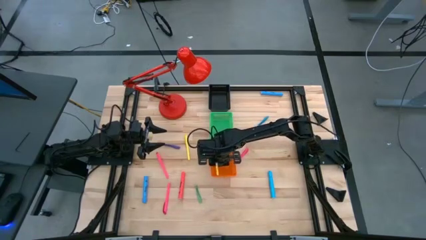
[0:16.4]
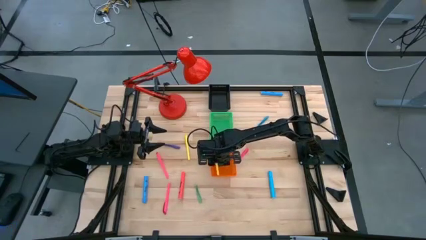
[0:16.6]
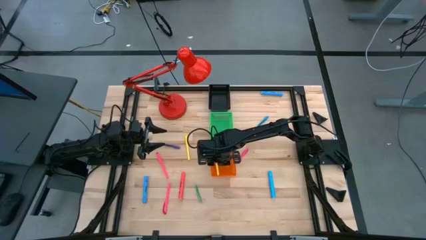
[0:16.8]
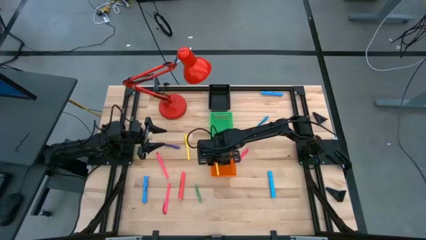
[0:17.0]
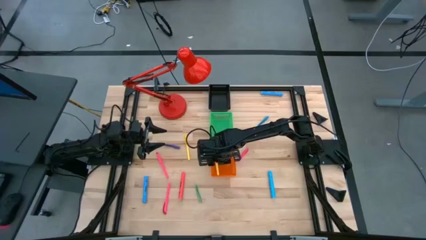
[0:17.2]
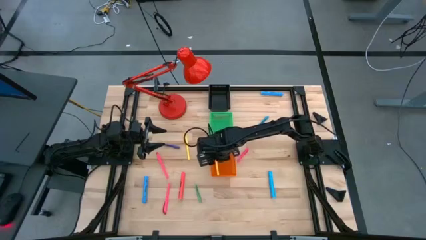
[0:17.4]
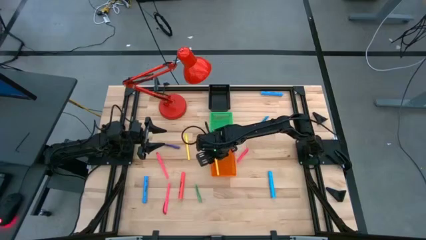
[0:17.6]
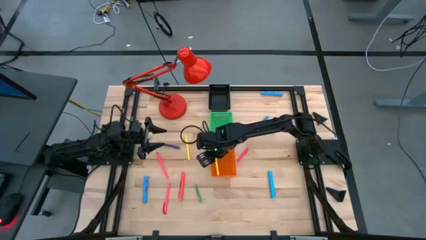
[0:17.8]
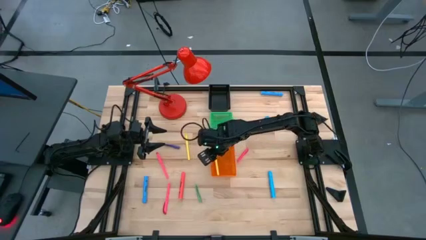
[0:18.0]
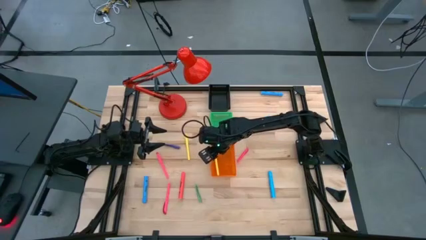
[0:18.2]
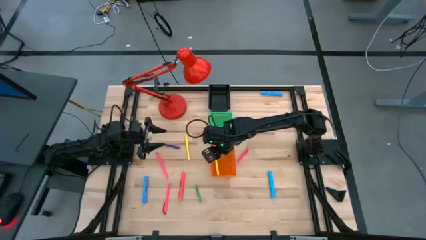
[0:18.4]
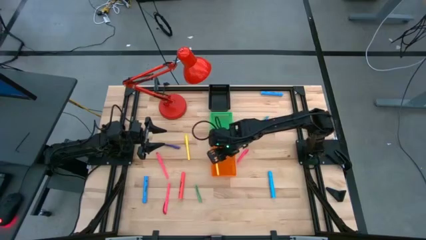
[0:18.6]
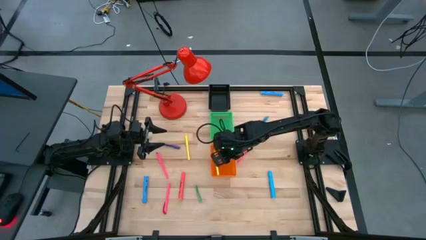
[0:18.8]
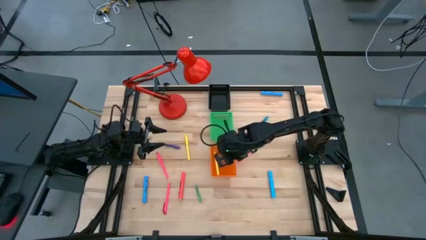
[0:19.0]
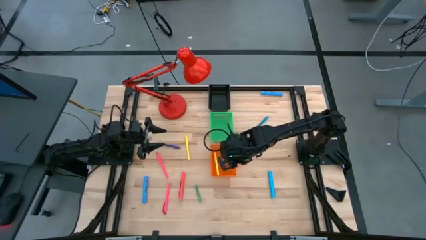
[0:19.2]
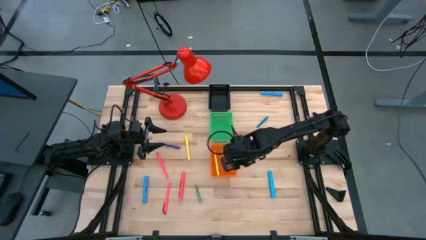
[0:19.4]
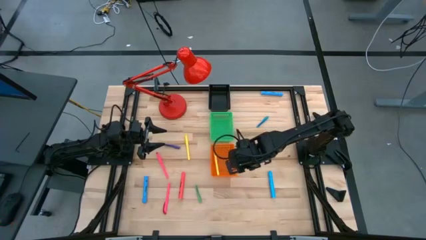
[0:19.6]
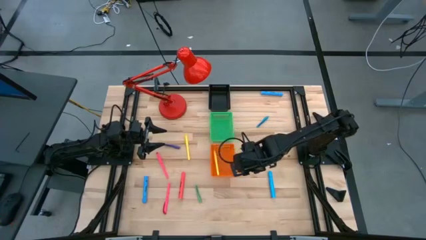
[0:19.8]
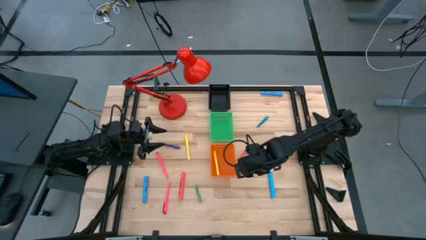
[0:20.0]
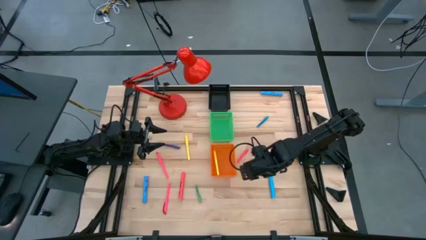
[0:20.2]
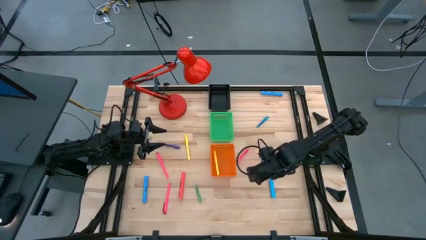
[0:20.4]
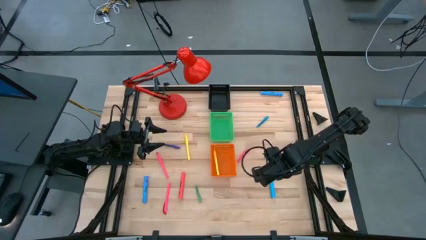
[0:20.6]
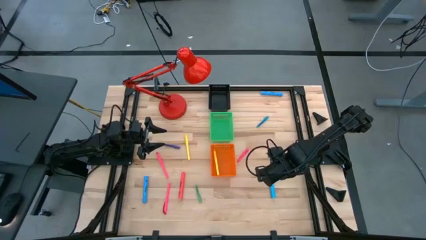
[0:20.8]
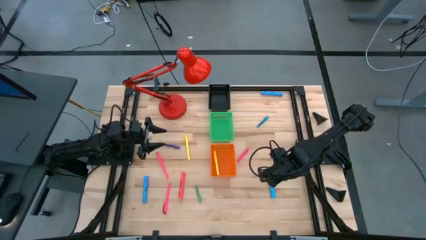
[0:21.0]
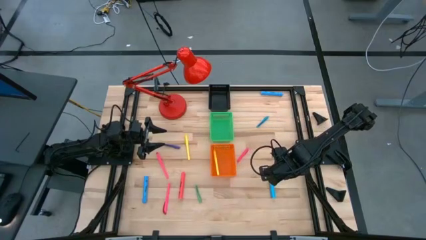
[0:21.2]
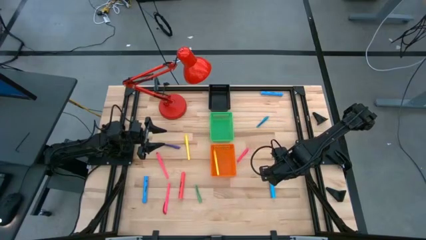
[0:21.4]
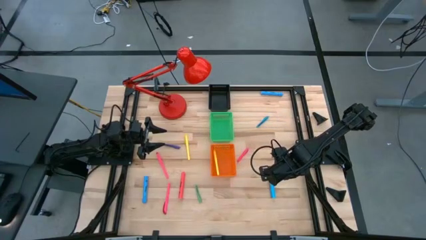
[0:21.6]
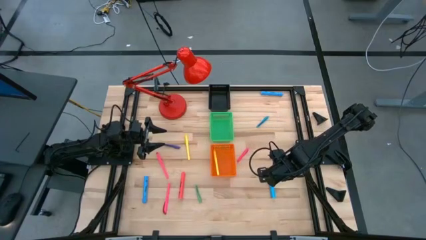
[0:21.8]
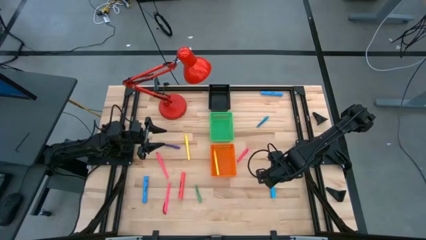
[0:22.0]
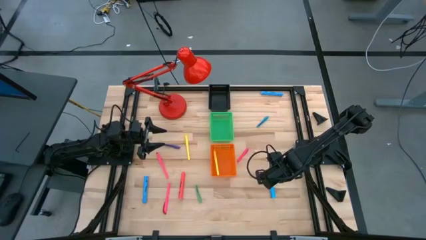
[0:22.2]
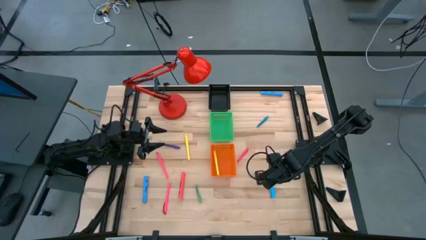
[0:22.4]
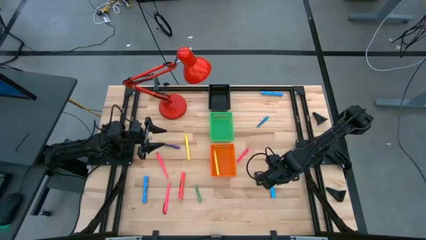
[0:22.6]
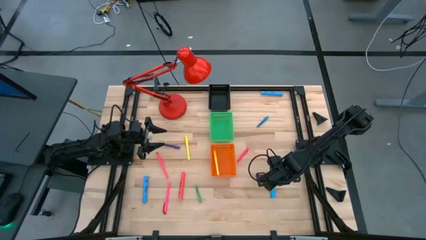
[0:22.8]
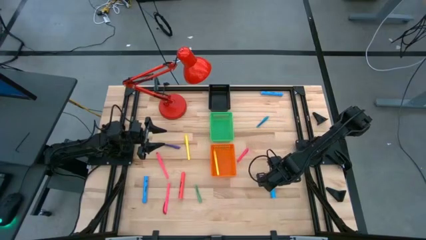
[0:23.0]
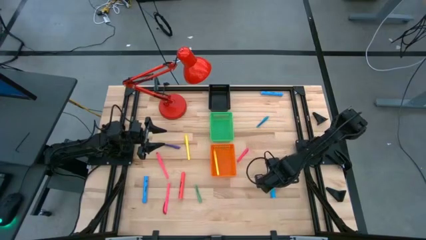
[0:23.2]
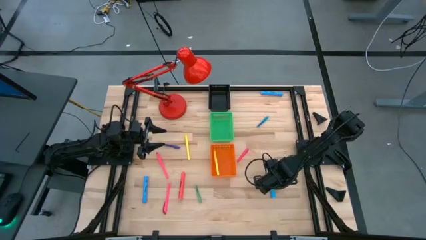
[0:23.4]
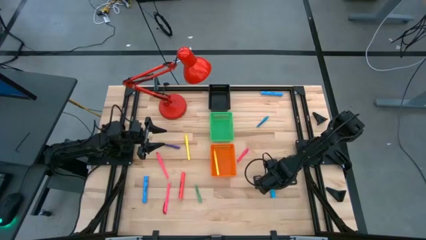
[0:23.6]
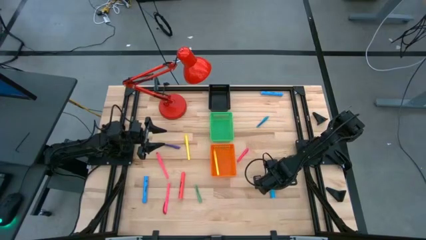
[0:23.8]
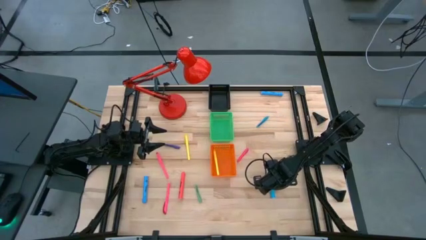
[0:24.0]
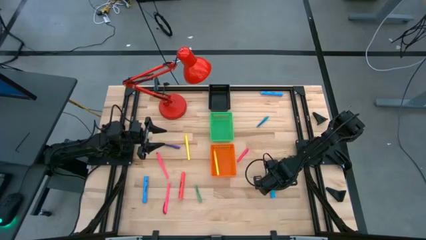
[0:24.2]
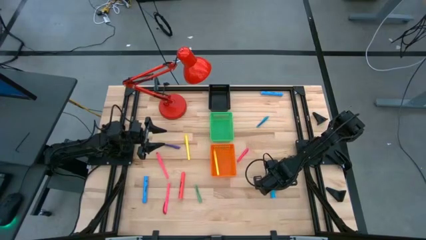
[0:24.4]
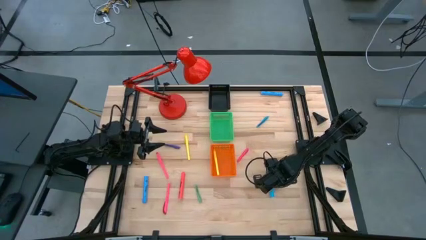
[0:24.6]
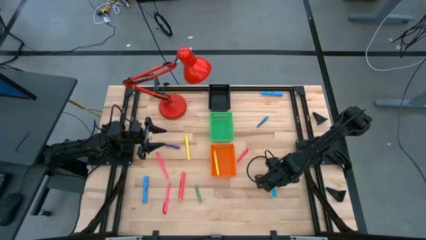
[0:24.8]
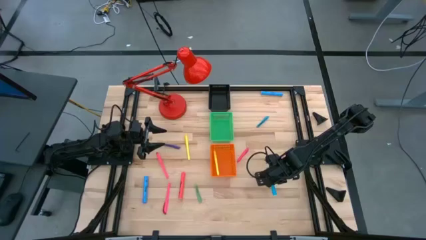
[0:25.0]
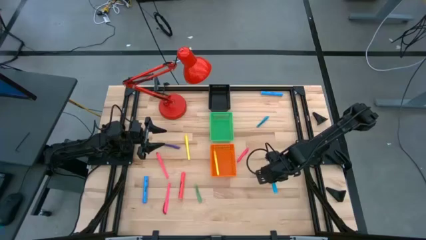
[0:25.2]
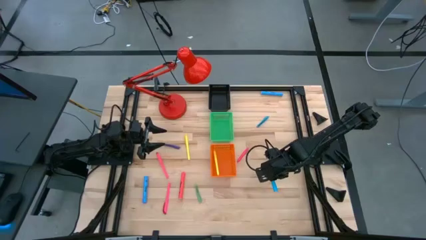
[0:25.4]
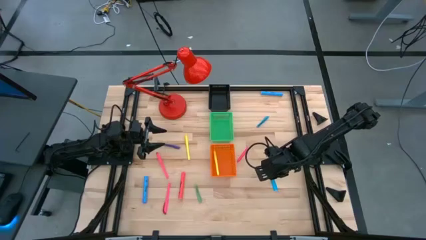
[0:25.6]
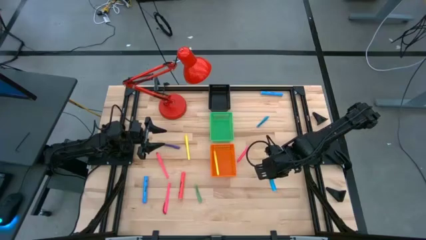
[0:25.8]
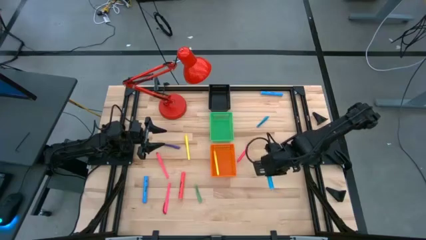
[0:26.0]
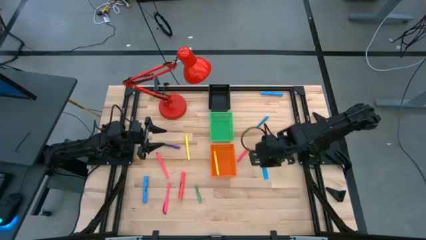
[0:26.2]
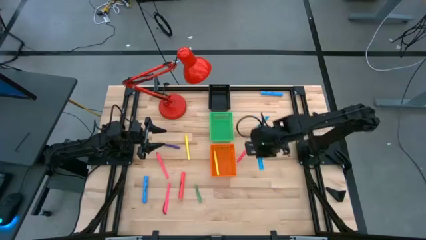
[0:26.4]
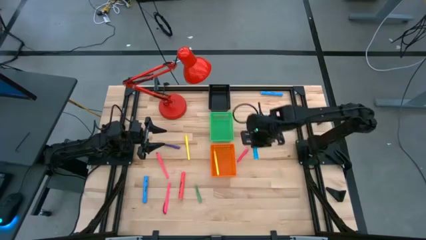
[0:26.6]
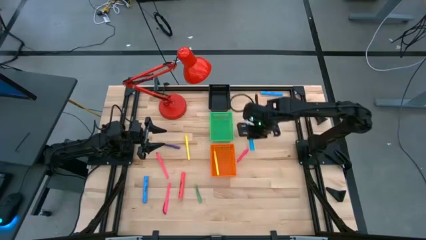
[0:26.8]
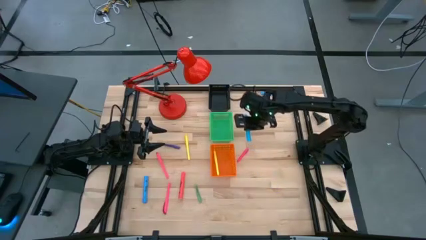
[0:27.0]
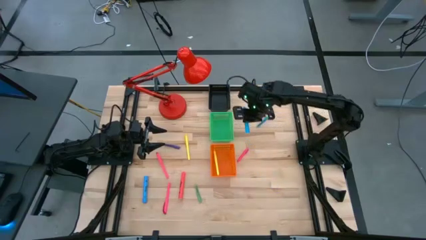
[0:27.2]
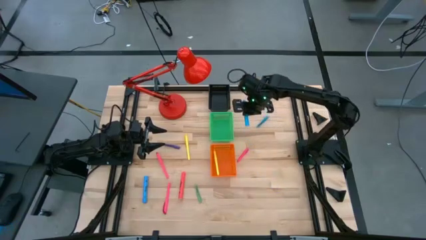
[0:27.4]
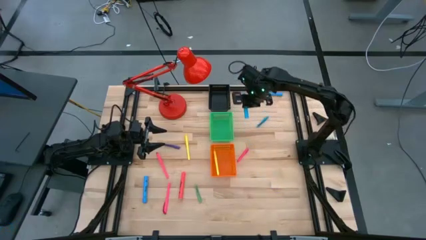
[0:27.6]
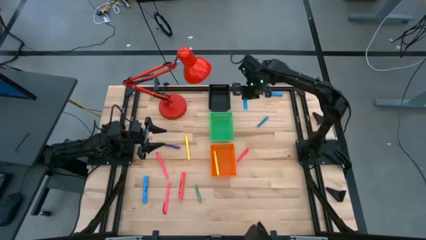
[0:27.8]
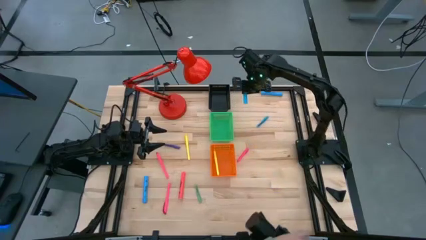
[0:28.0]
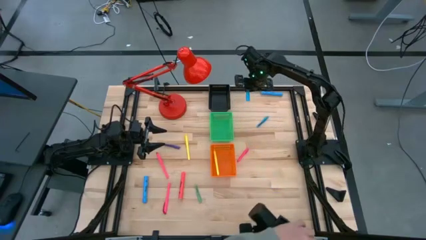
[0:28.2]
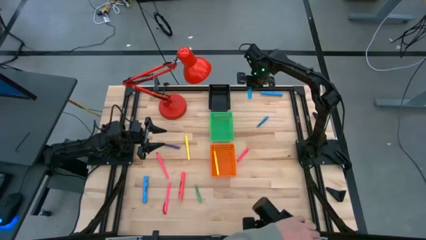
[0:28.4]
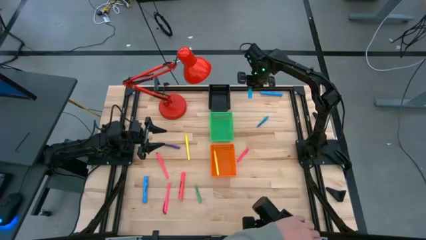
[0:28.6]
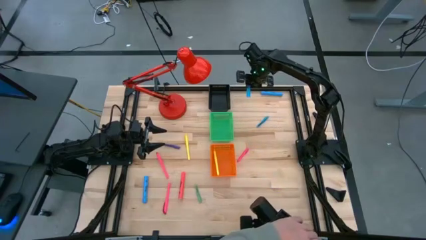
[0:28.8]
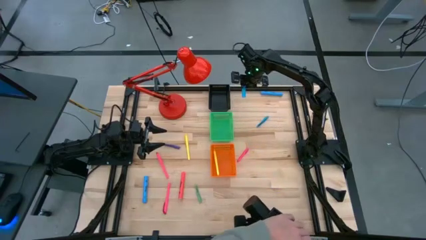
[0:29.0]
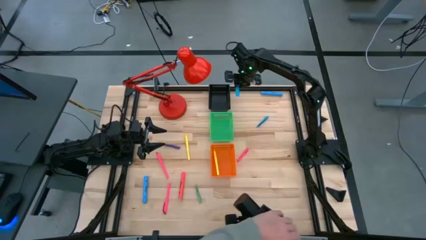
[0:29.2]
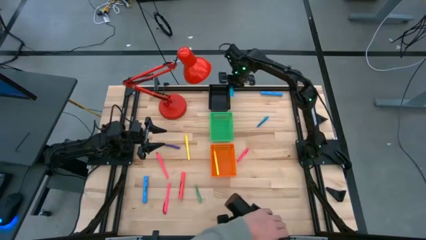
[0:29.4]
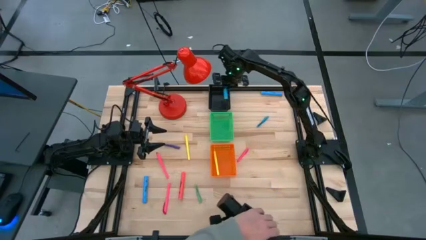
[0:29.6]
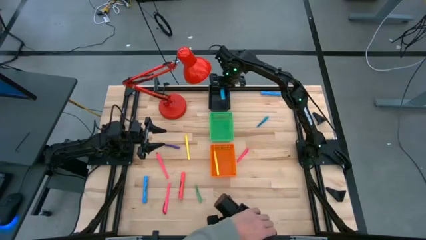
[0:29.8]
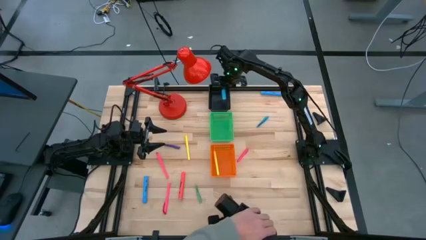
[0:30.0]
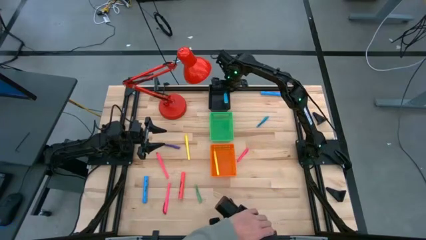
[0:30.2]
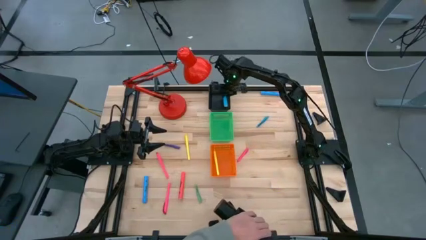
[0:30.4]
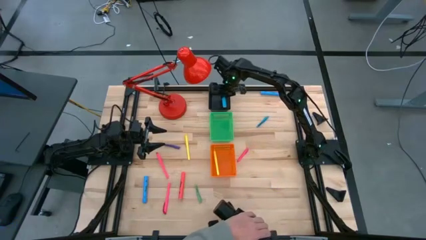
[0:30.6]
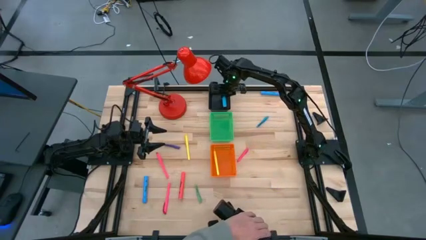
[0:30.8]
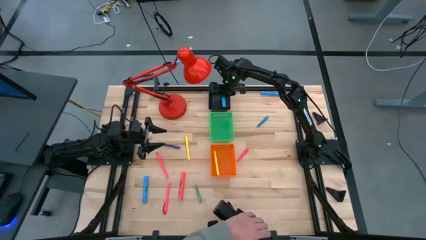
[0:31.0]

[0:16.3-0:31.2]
Task: Pick & Place Markers
Put the bottom right blue highlighter into the black bin
